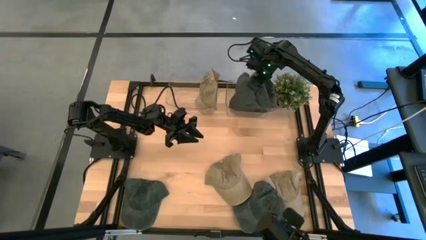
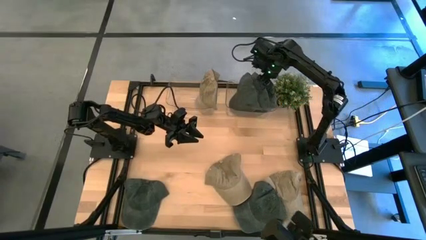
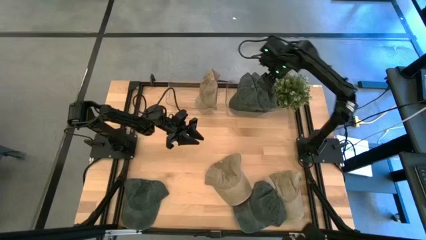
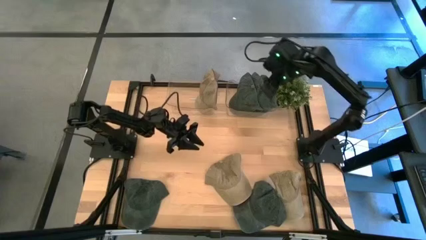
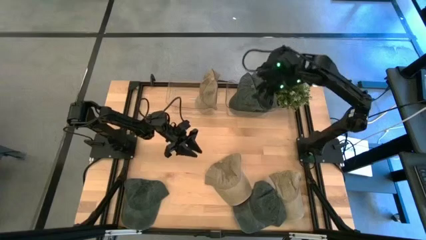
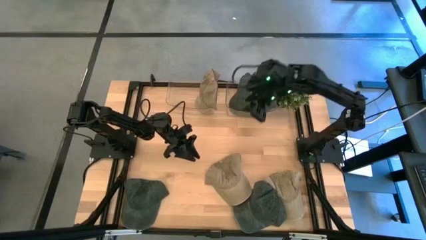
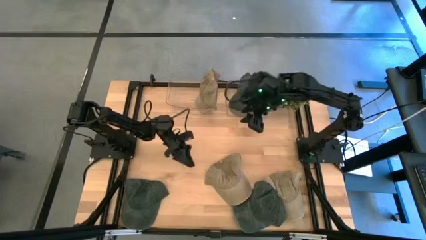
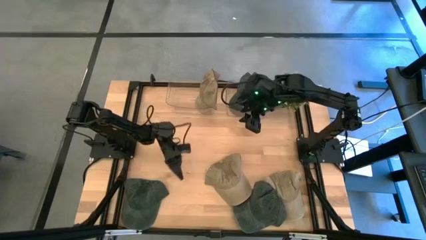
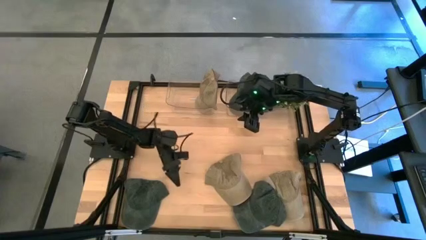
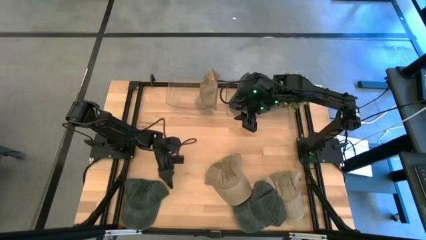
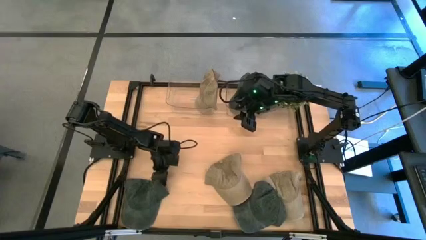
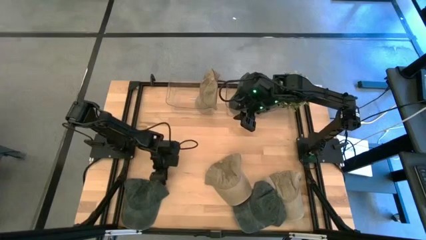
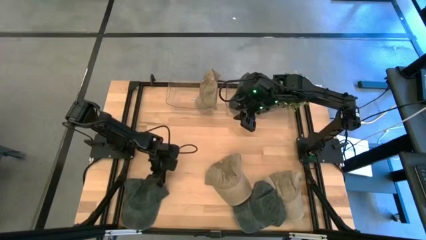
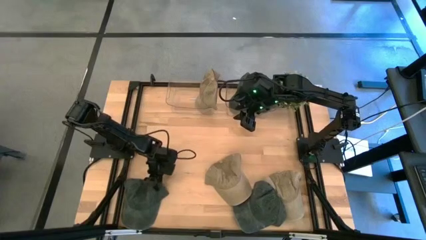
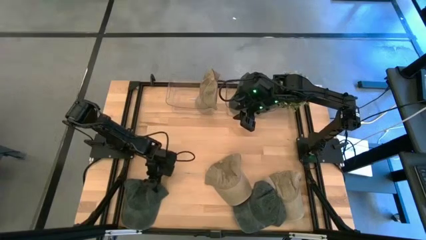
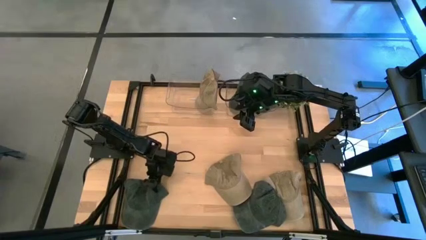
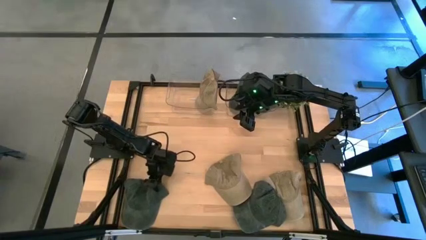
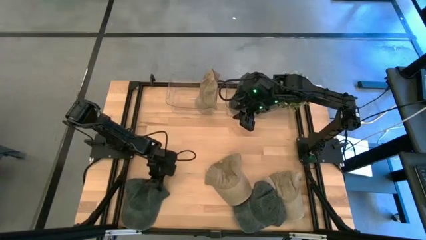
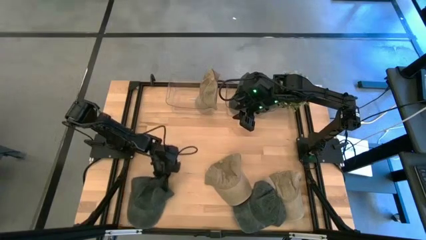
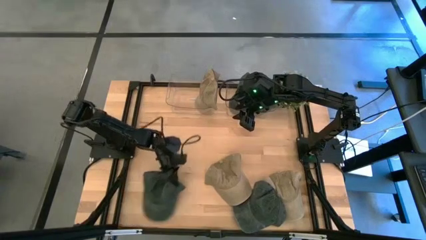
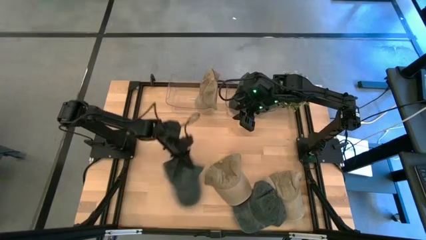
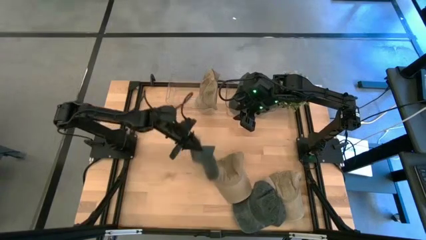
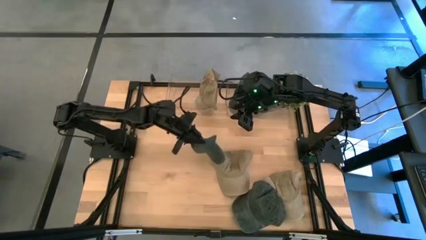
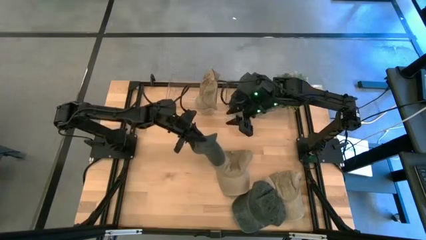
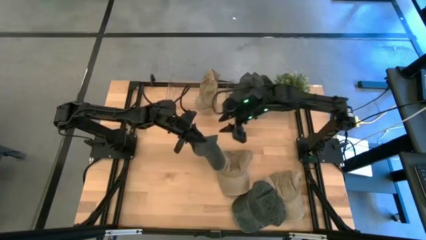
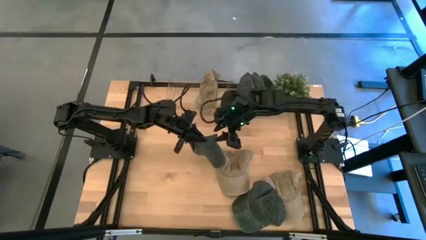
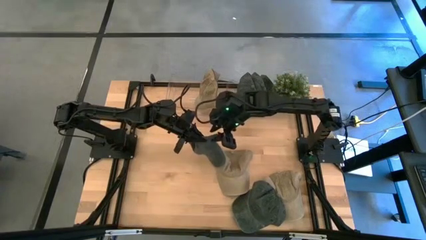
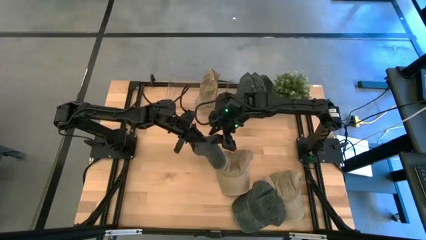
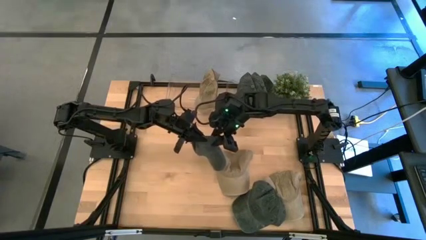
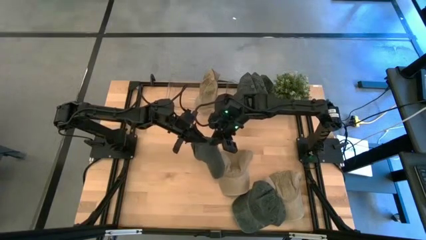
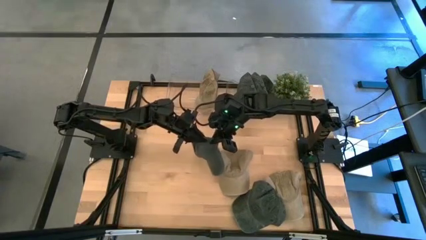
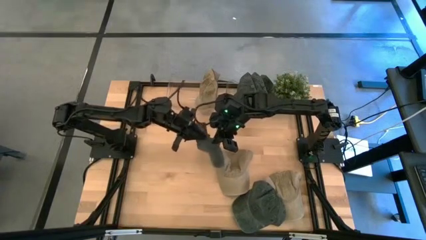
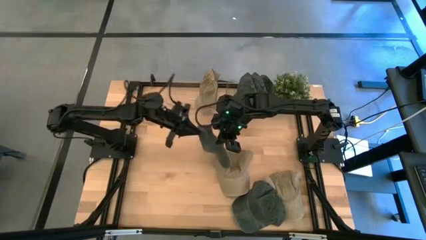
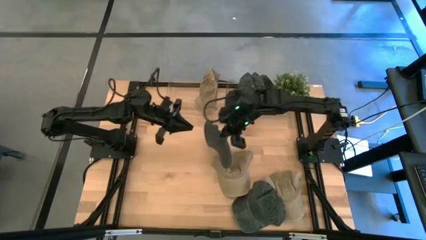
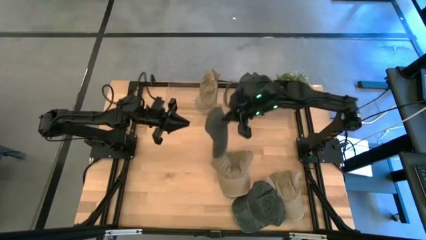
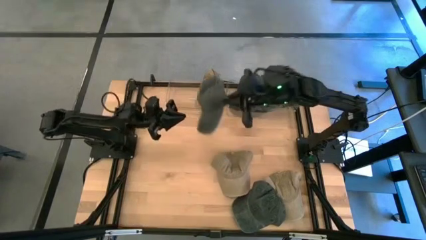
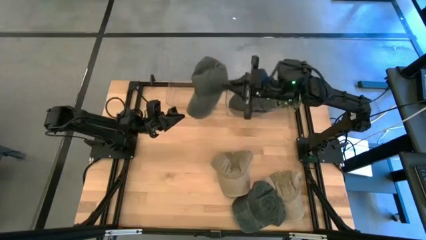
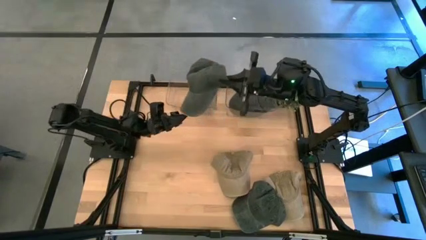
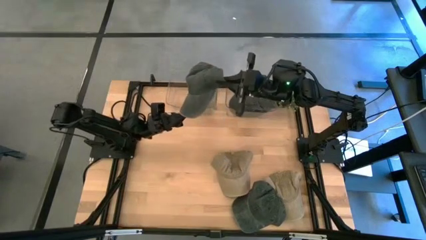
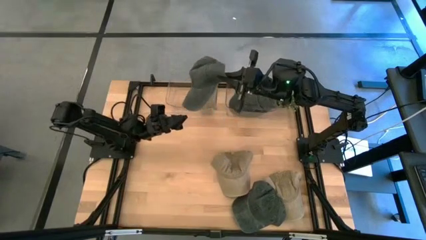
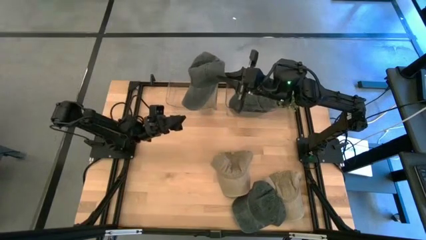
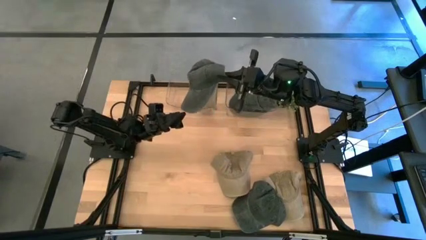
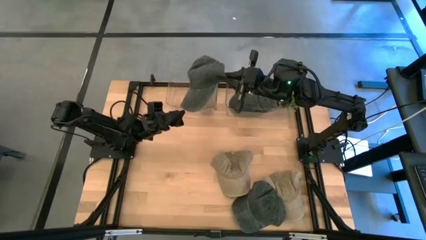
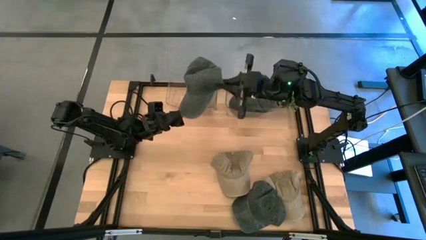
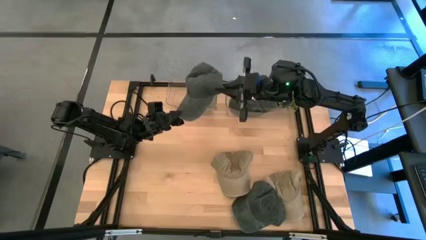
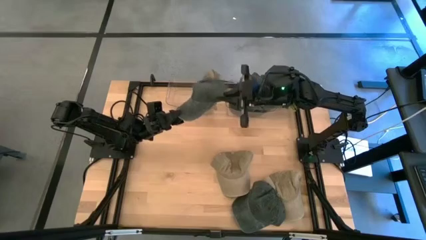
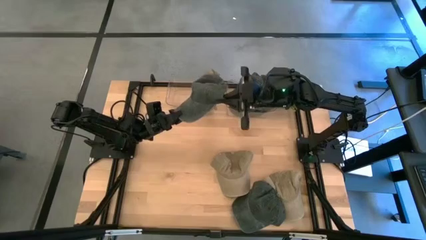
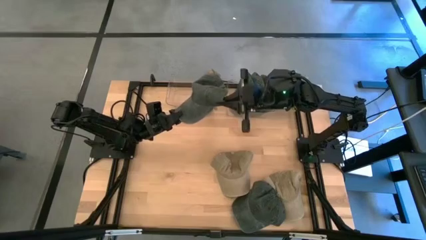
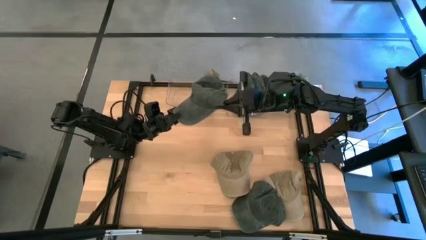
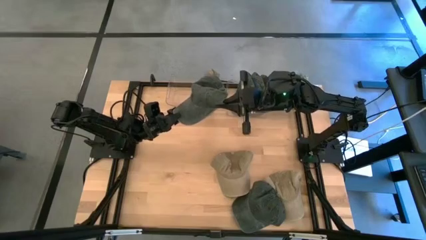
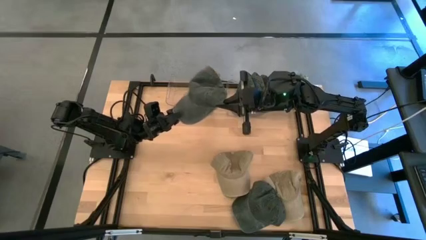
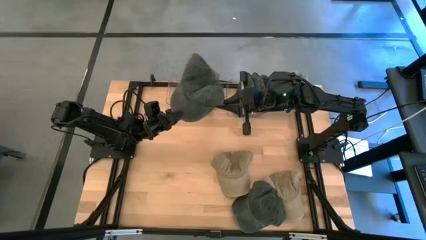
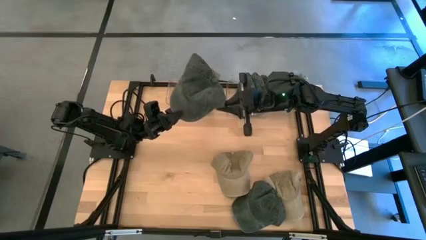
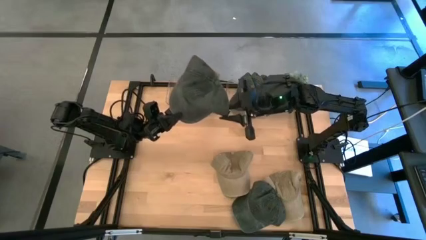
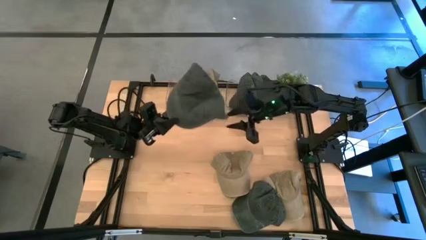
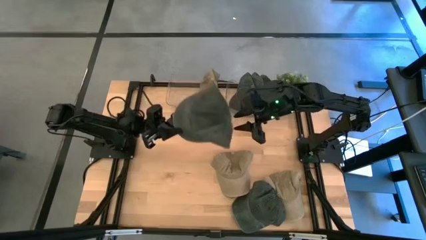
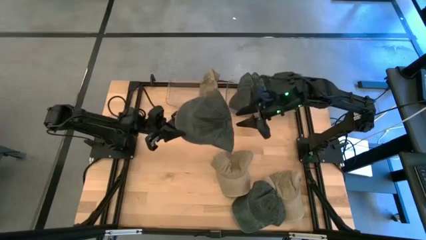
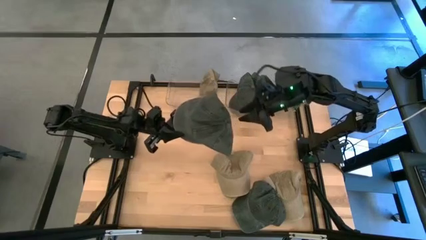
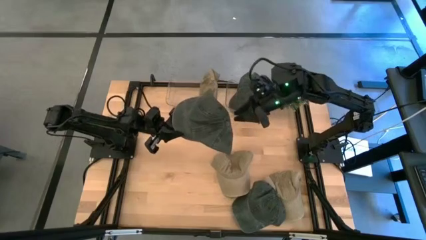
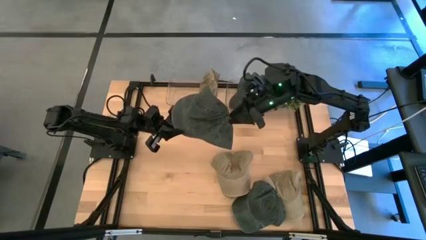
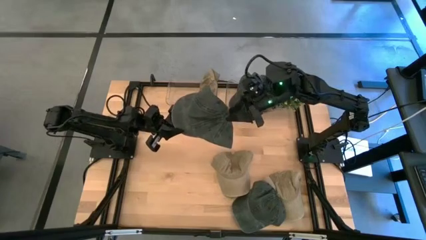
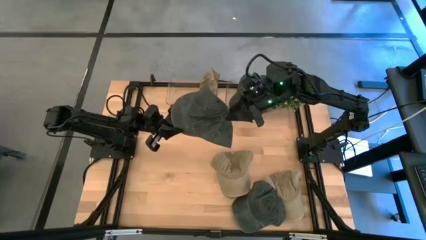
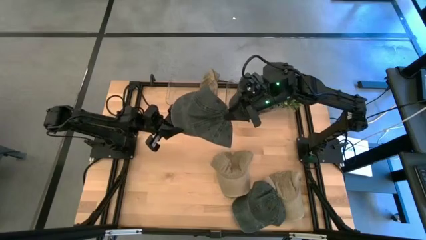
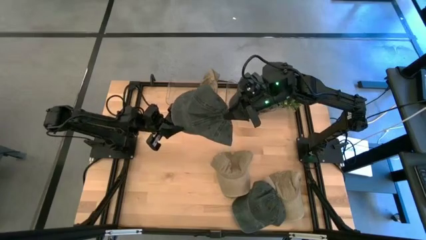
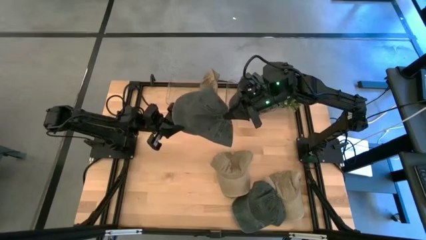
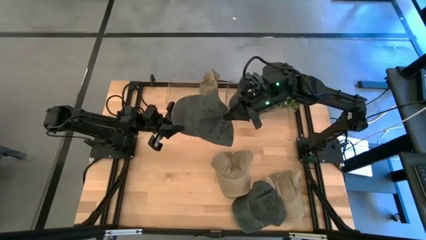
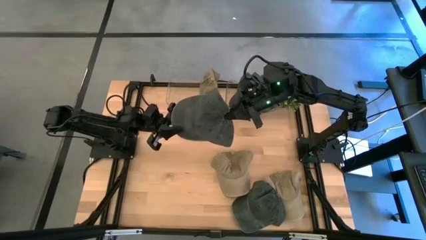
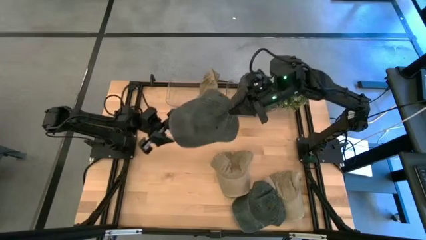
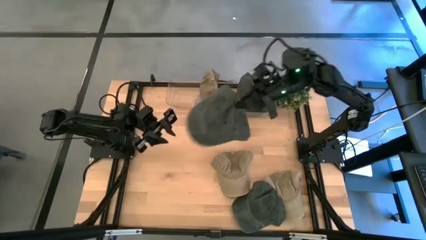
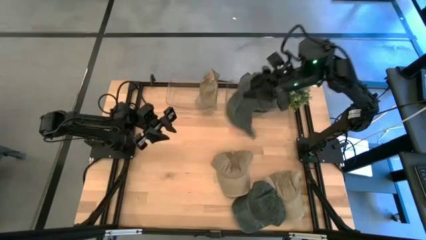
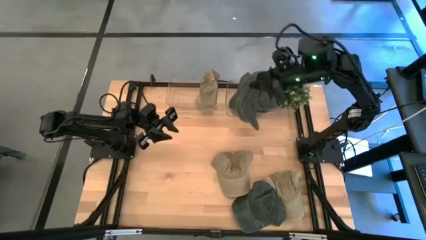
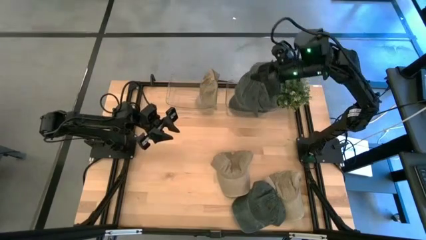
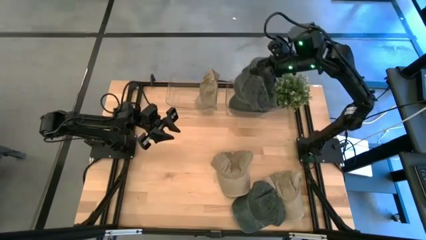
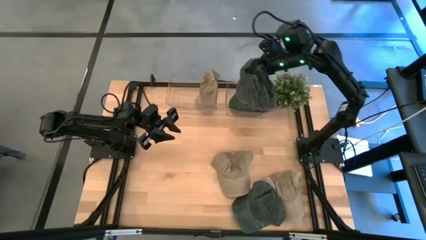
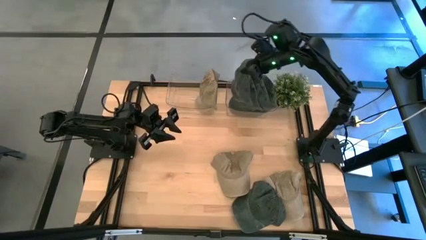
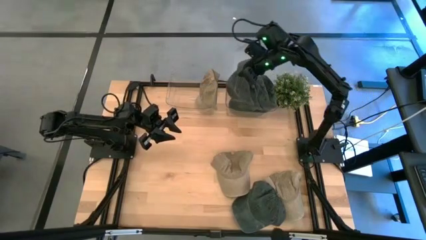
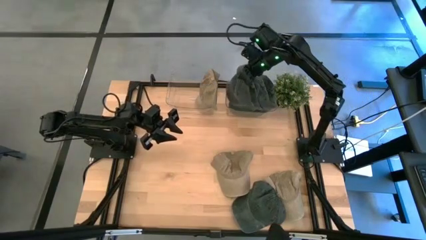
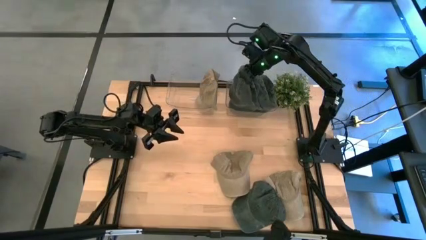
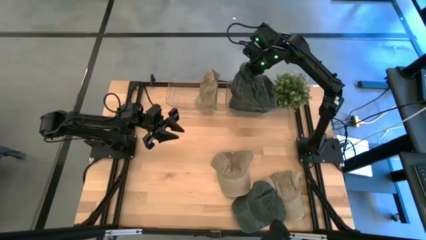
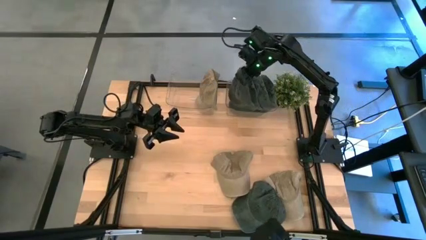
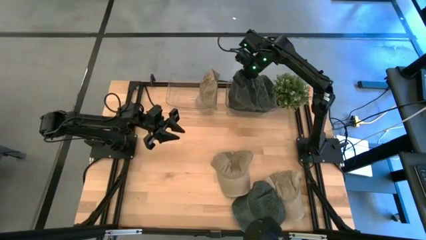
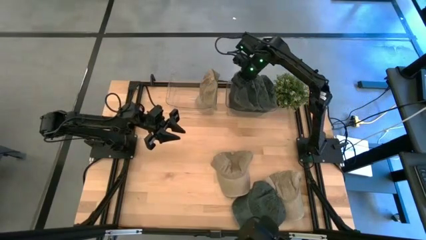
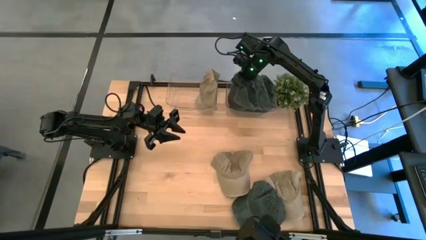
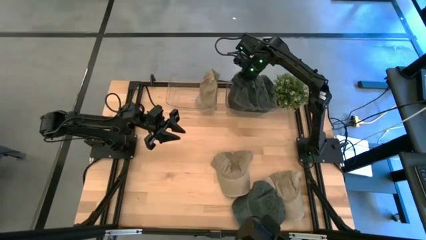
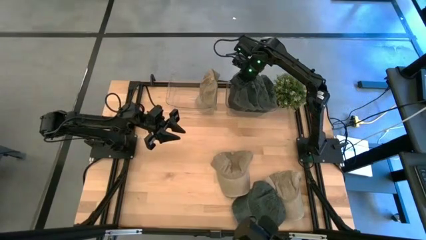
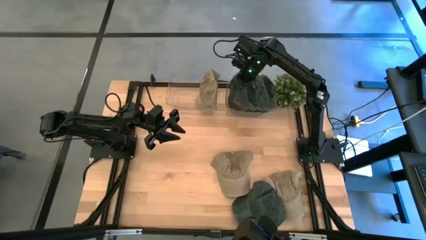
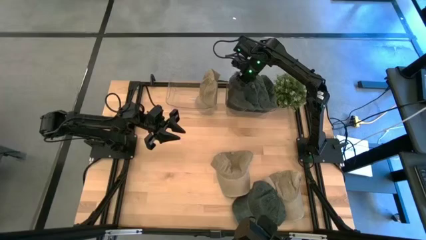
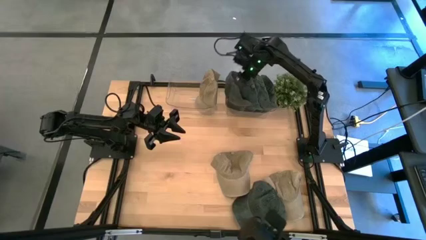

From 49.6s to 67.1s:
Task: Pick & Place hat
Put the black cap into the right transparent bin
